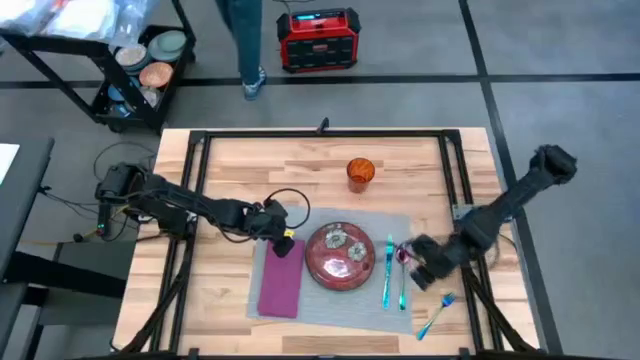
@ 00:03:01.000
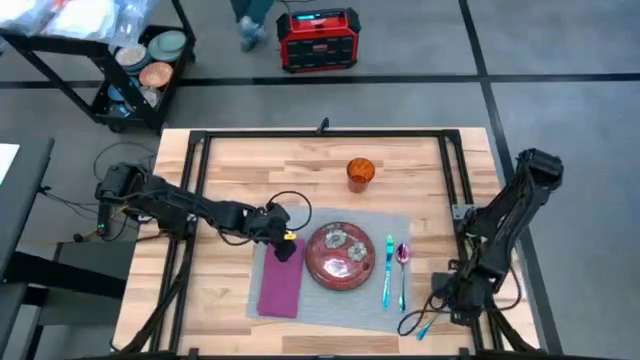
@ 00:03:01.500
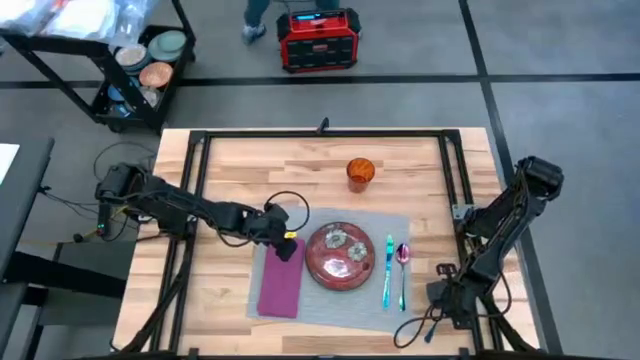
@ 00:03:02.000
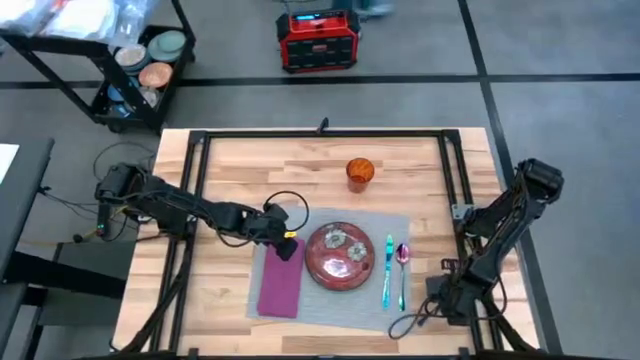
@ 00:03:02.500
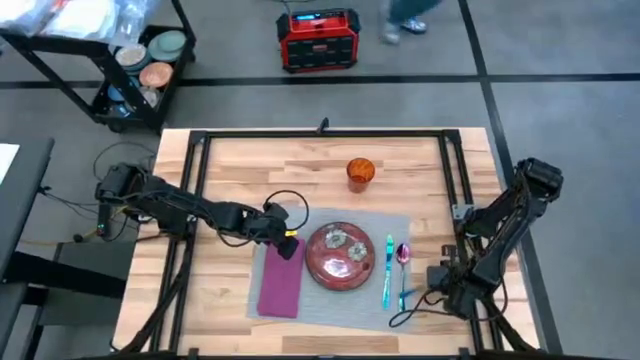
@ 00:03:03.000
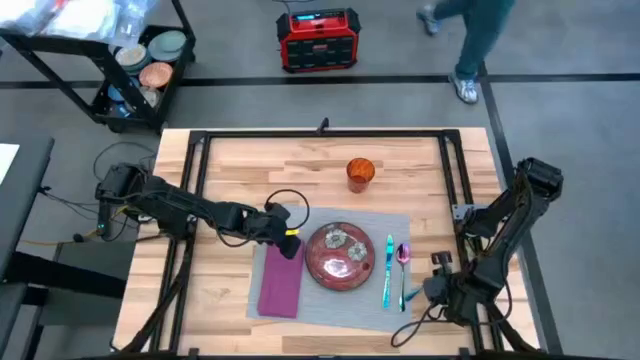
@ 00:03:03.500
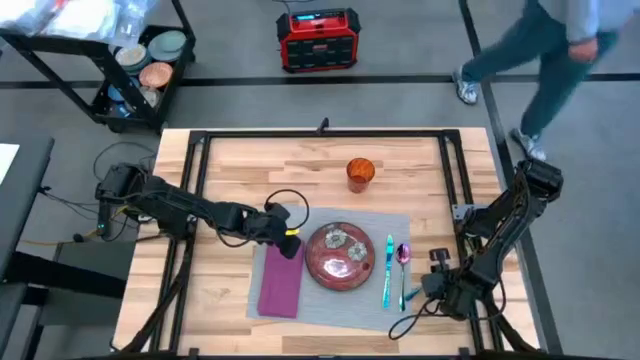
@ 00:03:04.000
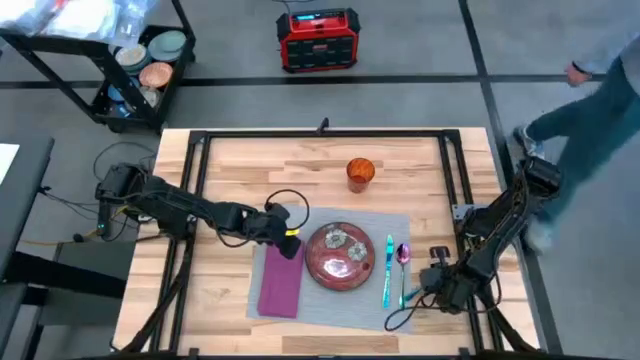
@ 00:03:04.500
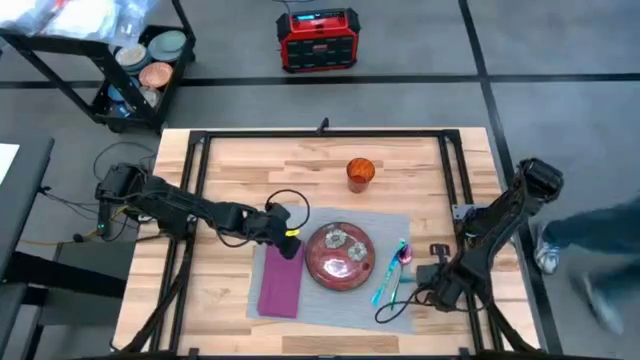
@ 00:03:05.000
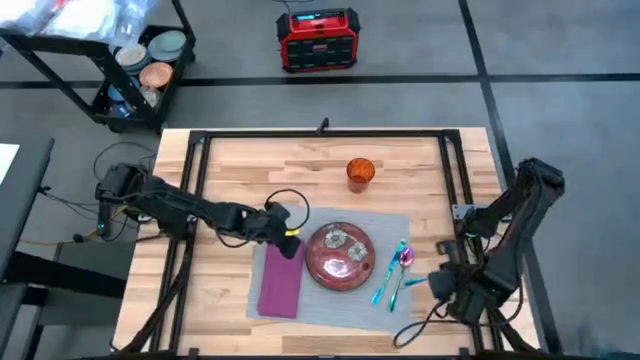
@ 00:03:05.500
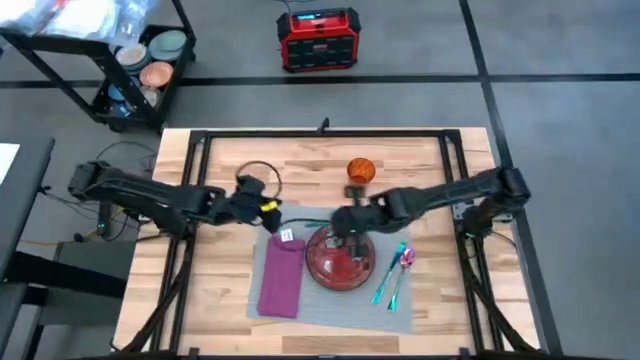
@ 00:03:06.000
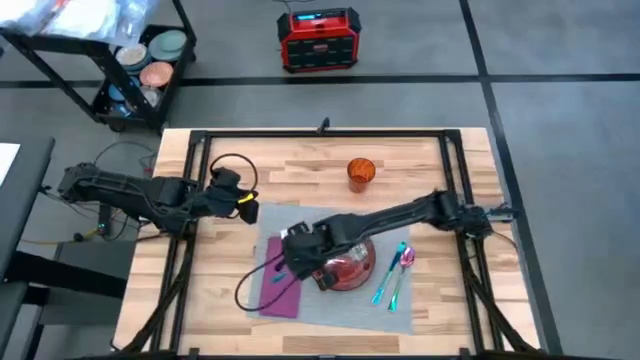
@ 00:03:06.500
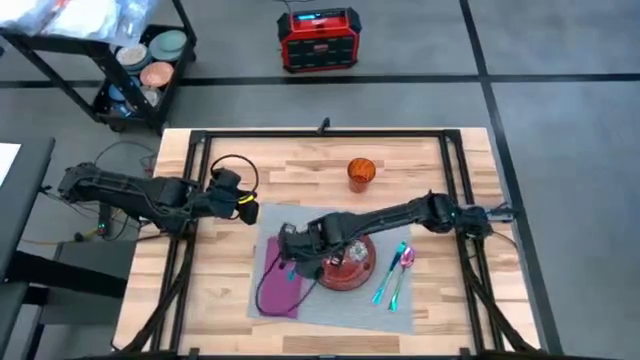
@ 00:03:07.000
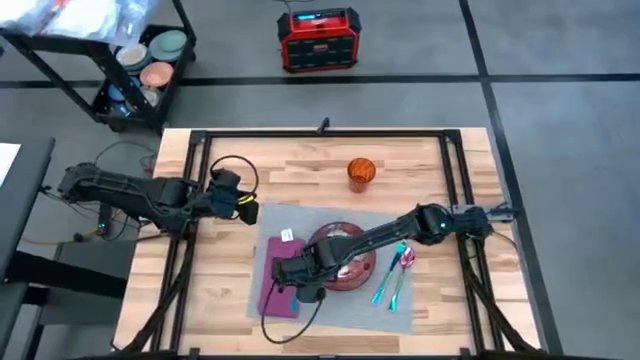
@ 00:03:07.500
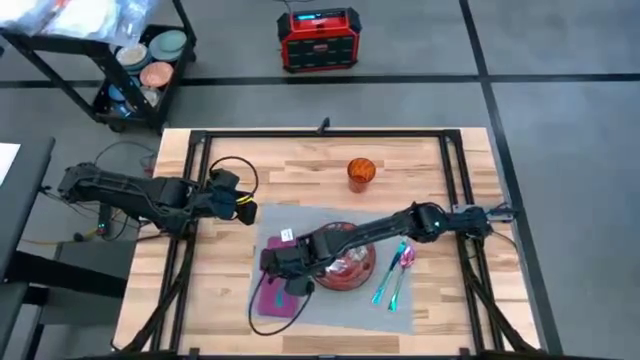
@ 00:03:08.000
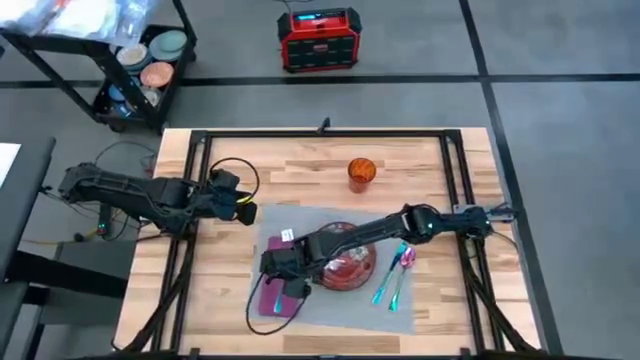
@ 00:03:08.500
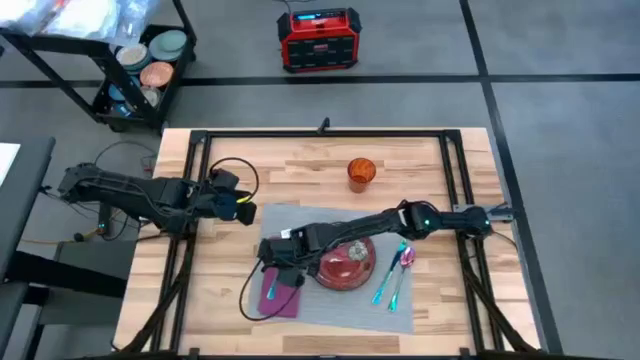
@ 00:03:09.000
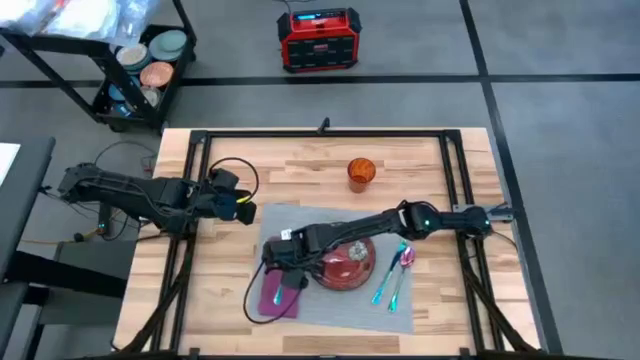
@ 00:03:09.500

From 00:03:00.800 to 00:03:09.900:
Task: Set table place
Put the blue fork on the pink table towel

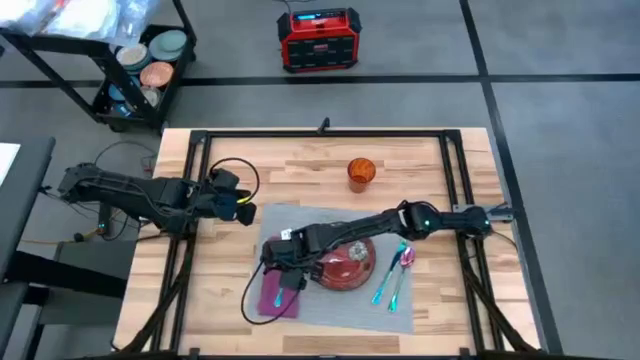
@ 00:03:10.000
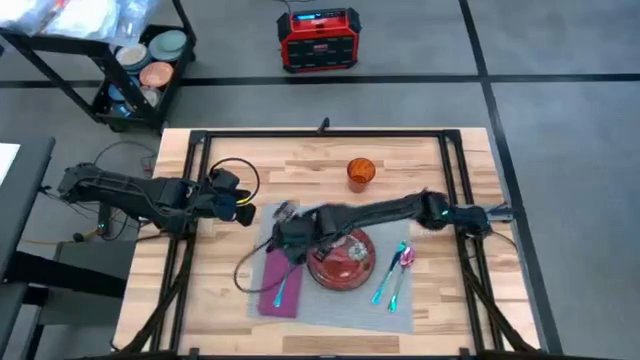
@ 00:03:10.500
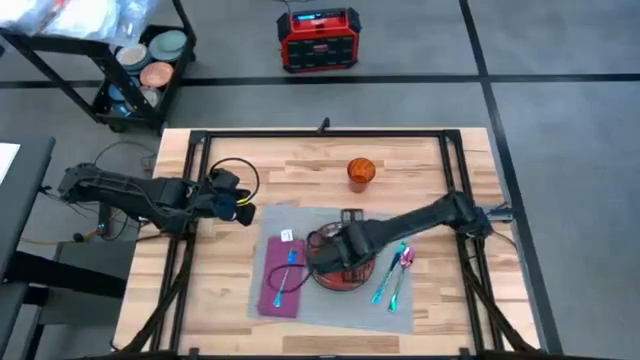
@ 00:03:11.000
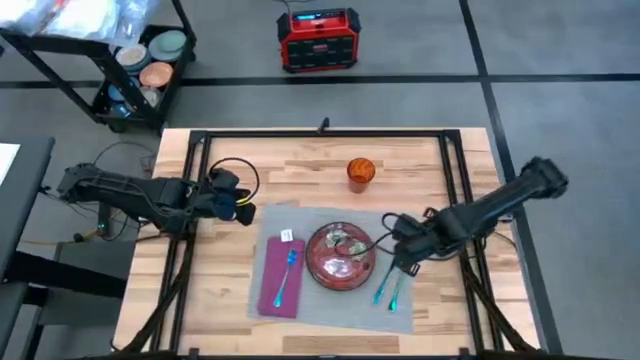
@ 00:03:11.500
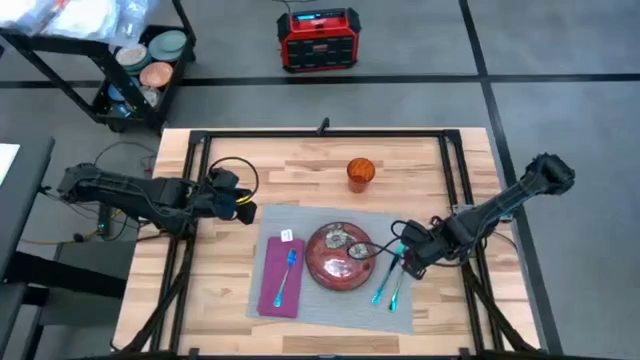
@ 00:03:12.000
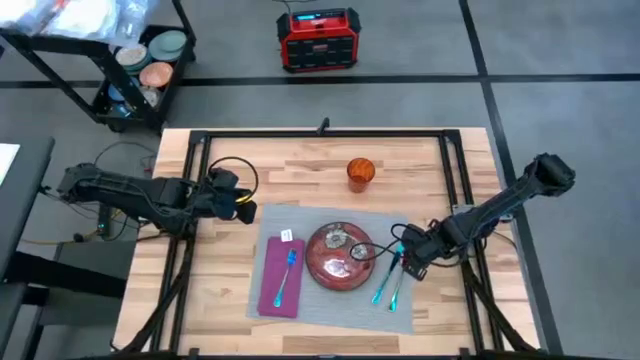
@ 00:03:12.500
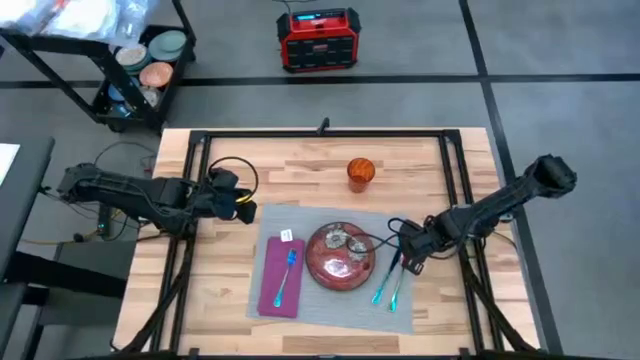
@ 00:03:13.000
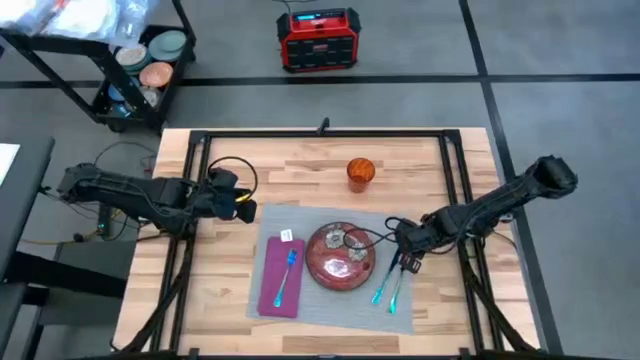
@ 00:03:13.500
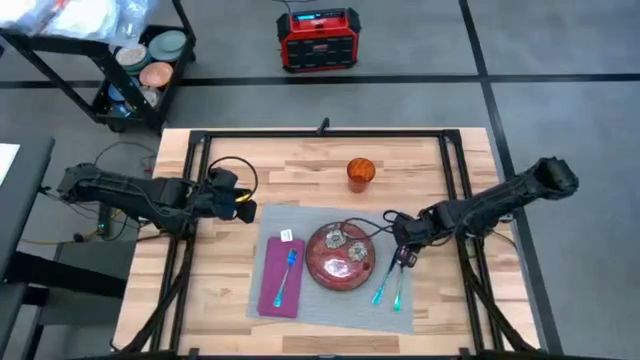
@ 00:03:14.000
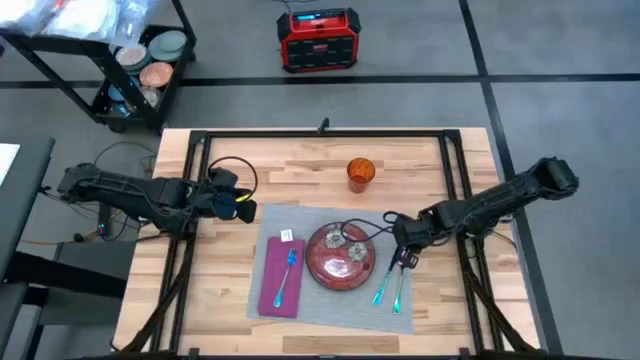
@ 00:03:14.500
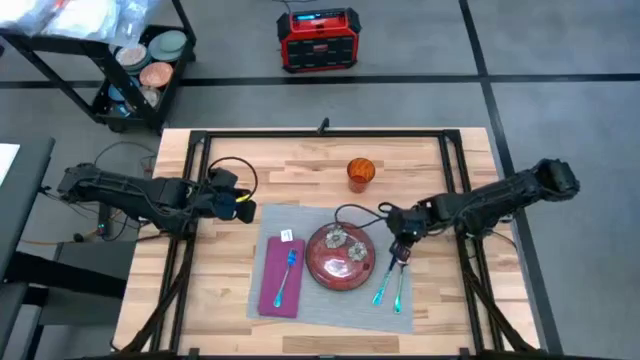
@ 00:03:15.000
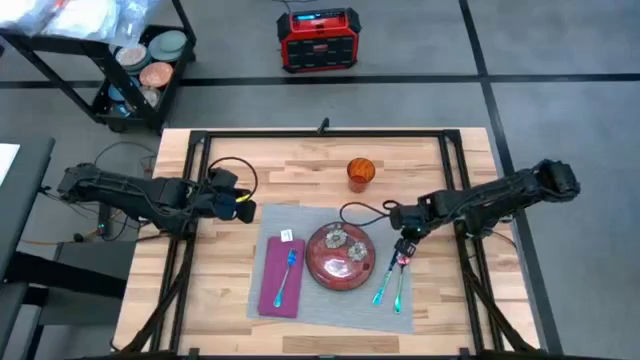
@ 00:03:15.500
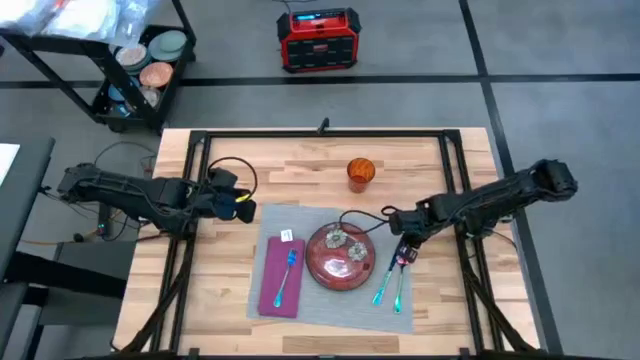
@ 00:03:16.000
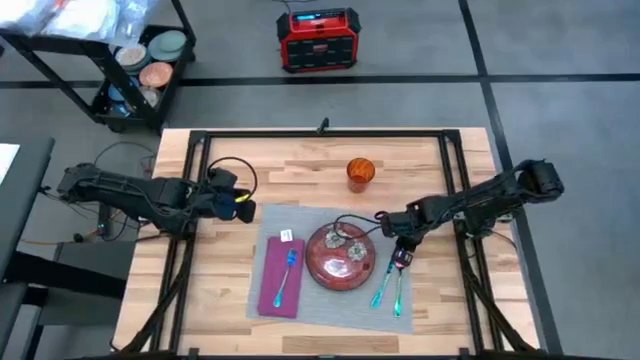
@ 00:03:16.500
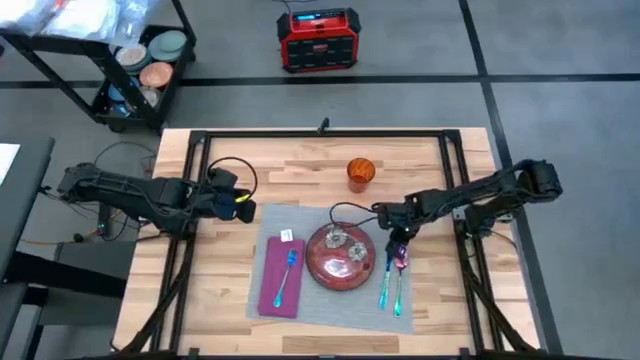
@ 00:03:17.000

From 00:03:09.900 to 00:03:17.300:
Adjust the blue table knife

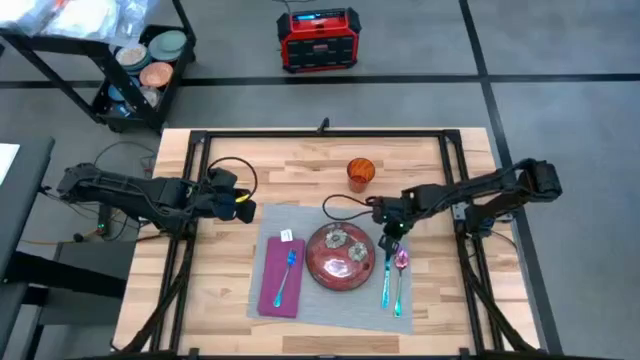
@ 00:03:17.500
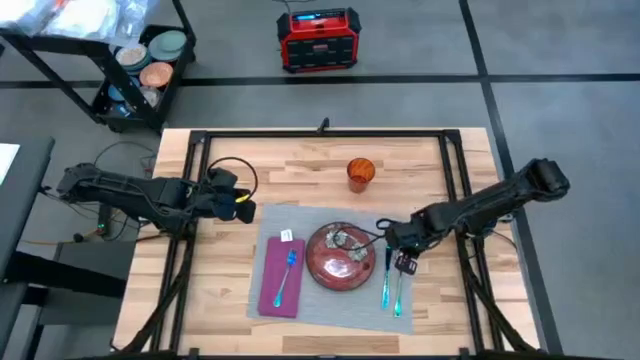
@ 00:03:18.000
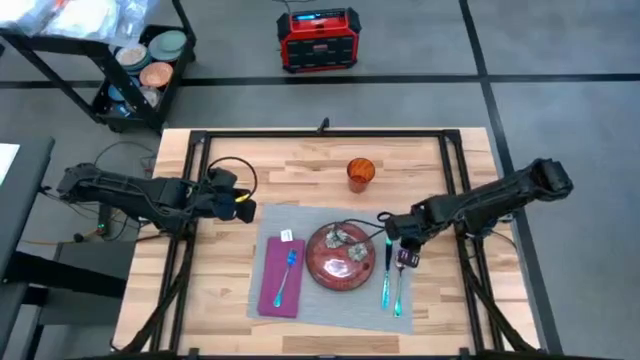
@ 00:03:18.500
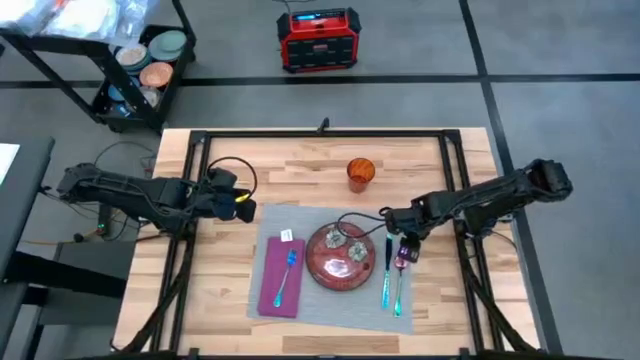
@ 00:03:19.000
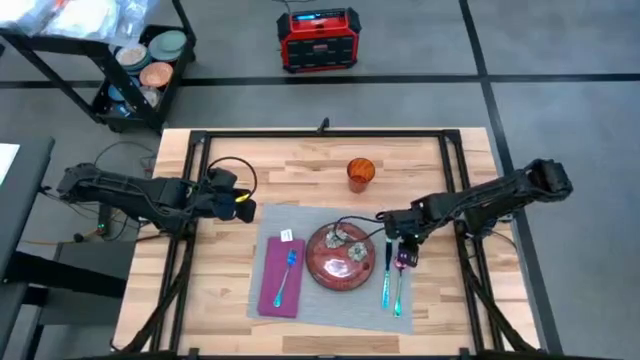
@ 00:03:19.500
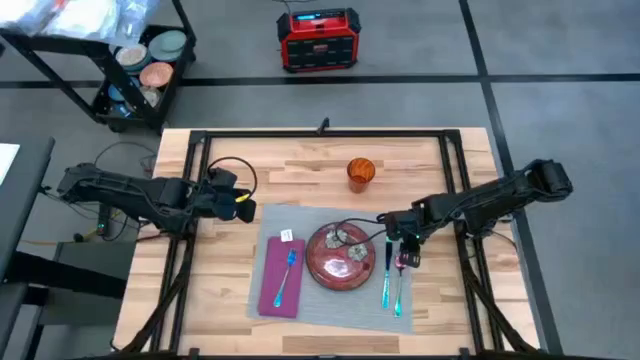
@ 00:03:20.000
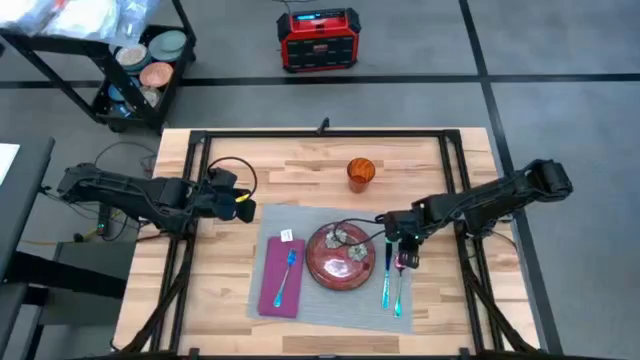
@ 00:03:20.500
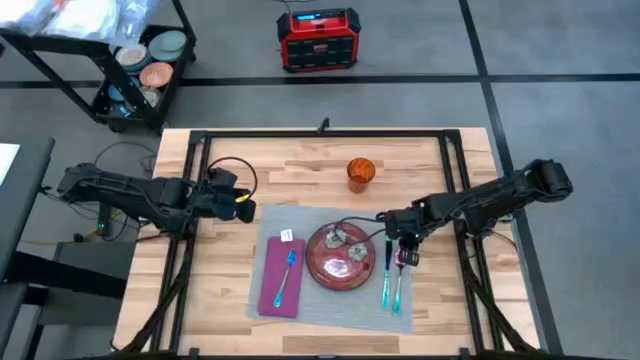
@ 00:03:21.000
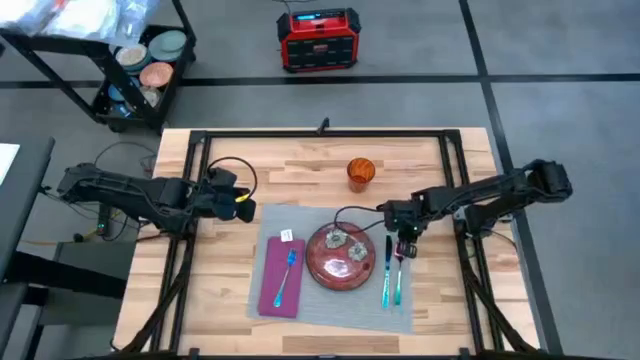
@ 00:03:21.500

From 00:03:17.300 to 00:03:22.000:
Adjust the blue spoon
